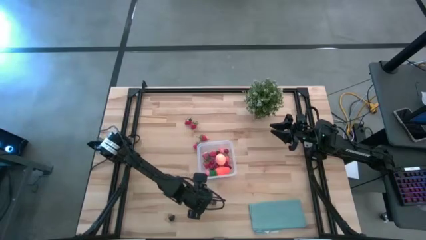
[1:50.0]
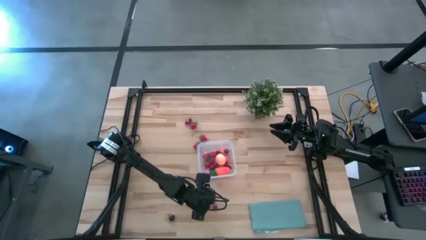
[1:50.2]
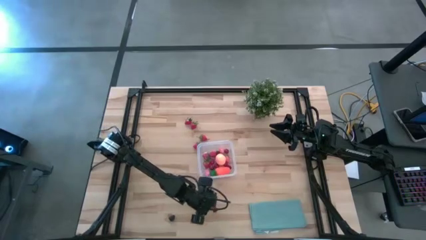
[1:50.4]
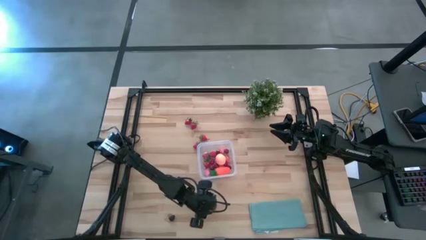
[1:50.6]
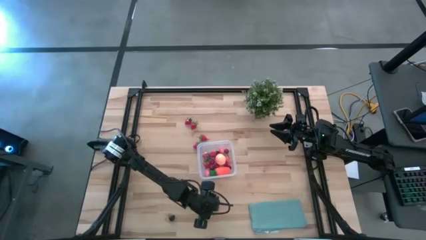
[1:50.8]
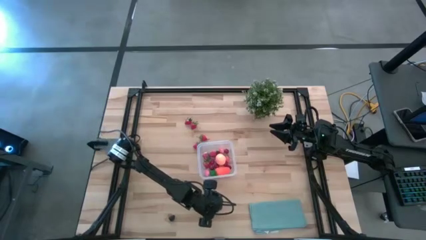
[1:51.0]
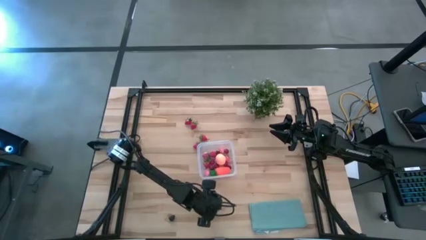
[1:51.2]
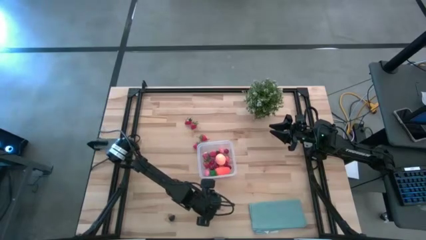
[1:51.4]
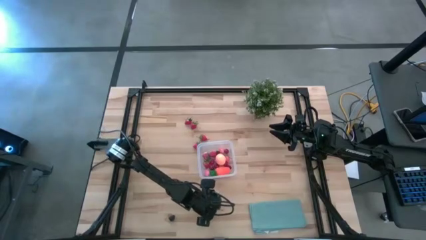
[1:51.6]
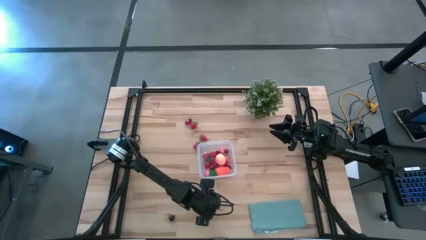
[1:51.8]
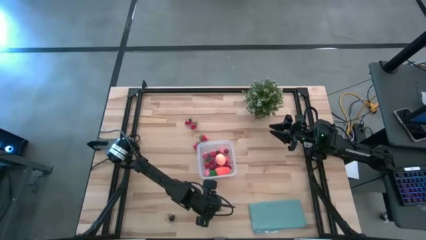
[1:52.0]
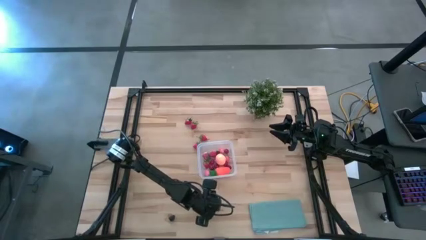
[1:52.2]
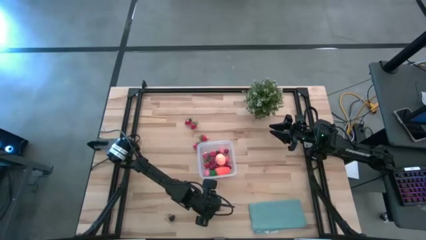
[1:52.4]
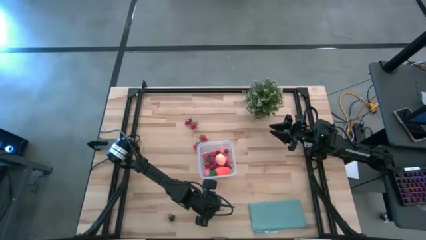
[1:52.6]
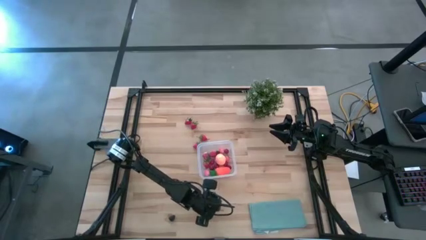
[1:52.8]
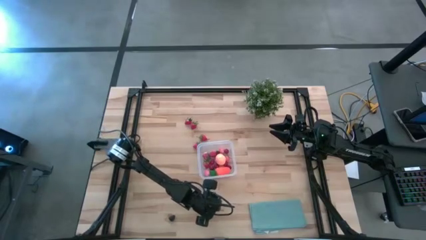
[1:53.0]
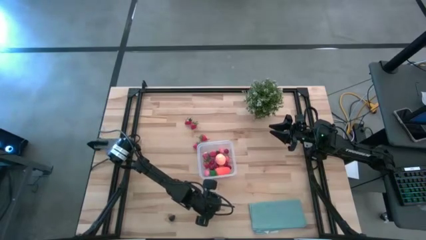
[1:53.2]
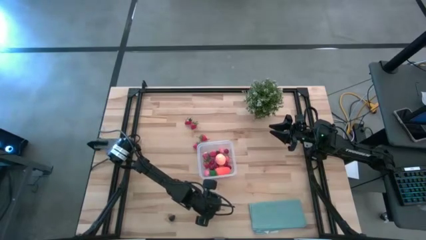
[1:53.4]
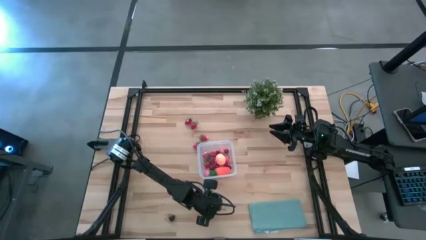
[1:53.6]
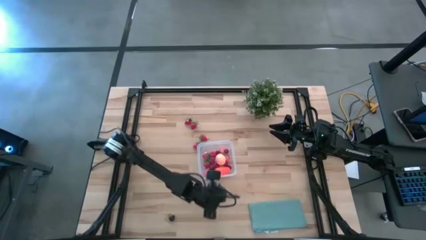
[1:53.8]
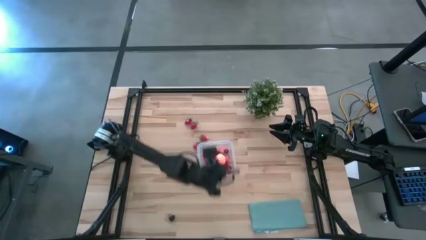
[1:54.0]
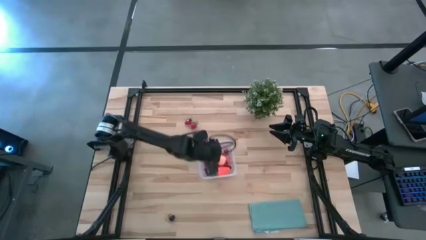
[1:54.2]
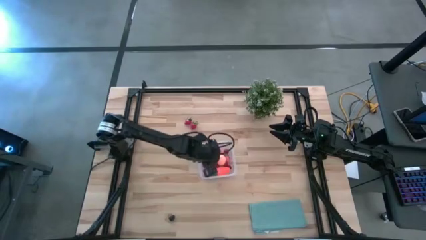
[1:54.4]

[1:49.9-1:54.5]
Task: Pick and placing Produce into tupperware
Put the cherry into the transparent bin

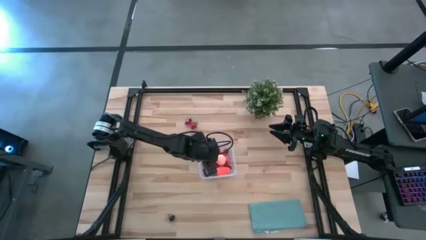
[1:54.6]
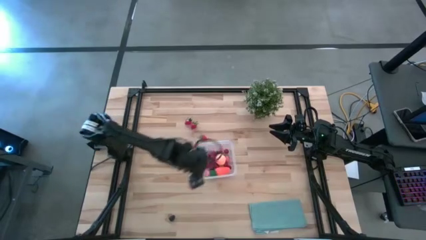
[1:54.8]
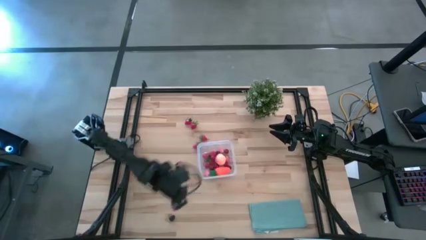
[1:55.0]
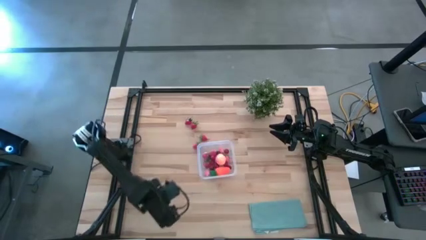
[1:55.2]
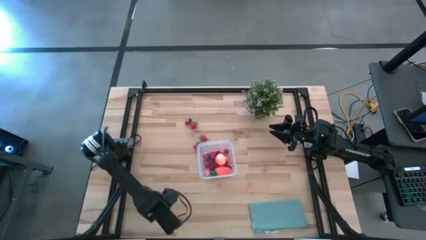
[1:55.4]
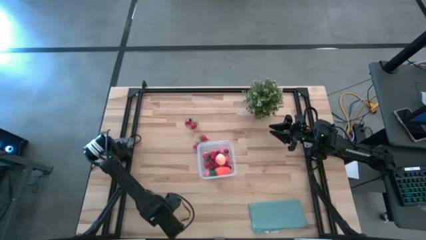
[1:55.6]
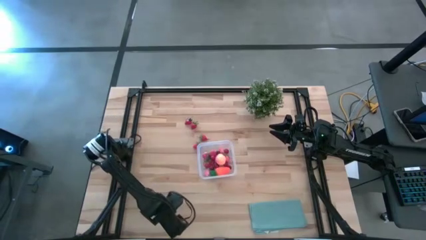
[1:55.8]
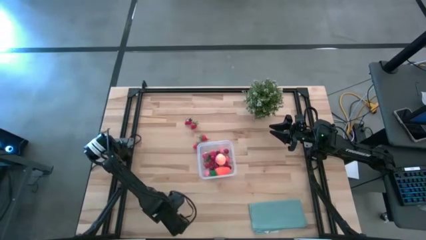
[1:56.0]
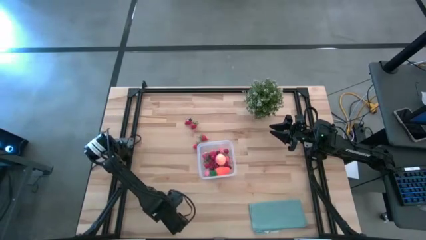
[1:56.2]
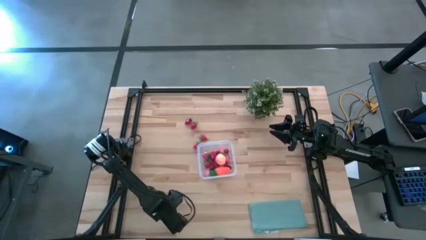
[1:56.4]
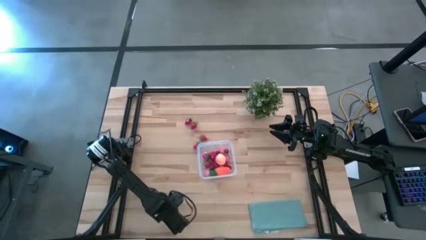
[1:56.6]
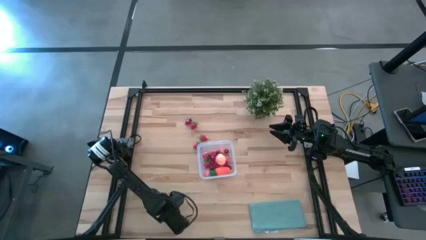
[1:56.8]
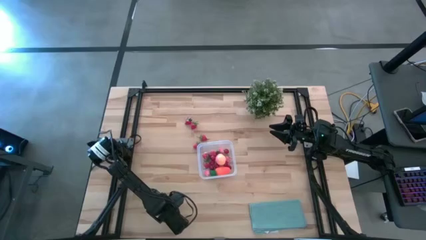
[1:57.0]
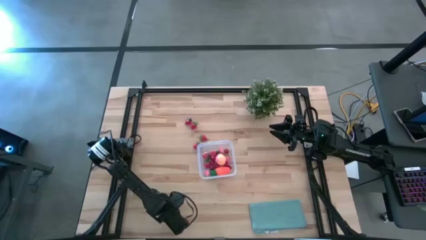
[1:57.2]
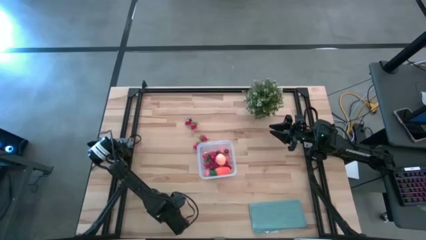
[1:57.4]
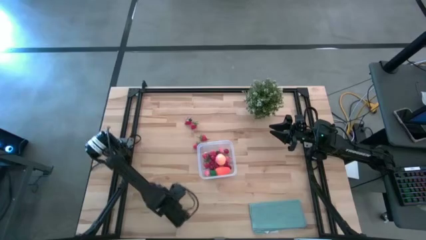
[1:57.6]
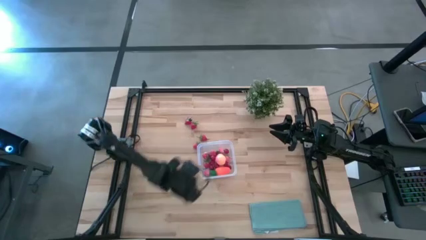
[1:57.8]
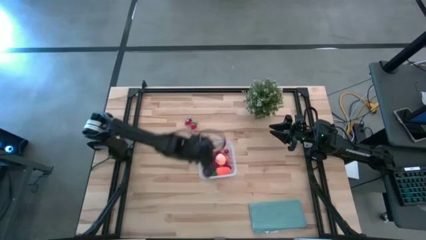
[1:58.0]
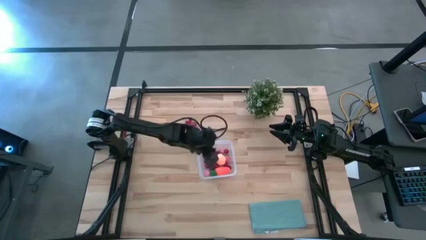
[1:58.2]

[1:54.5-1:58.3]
Put the blackberry into the transparent bin

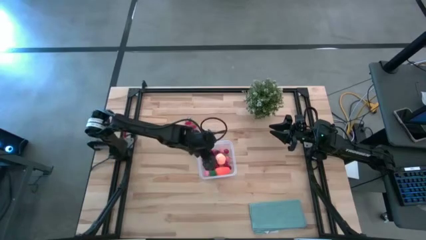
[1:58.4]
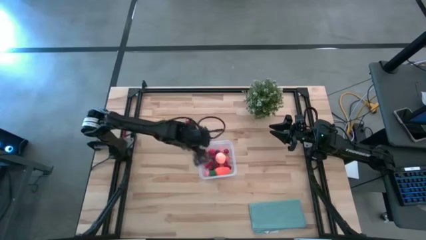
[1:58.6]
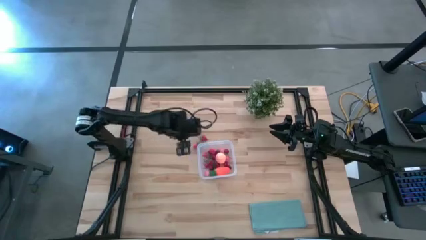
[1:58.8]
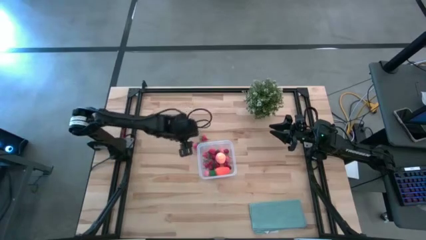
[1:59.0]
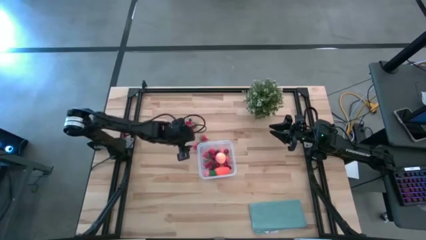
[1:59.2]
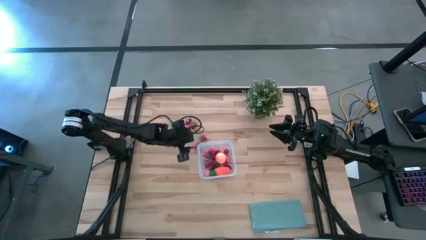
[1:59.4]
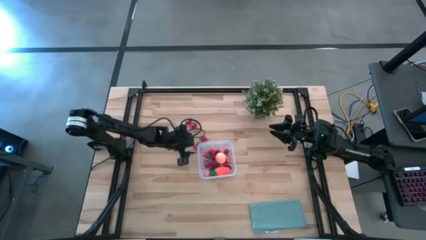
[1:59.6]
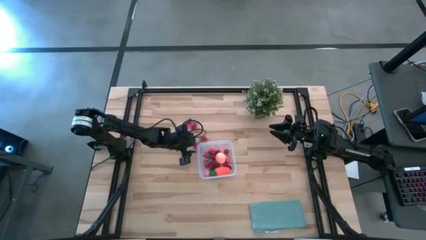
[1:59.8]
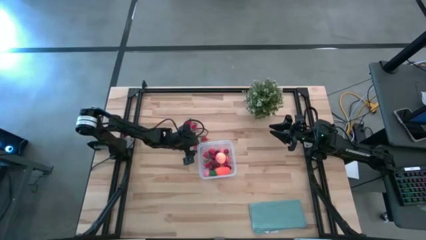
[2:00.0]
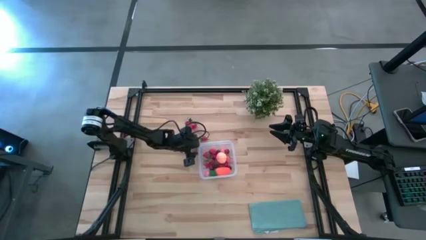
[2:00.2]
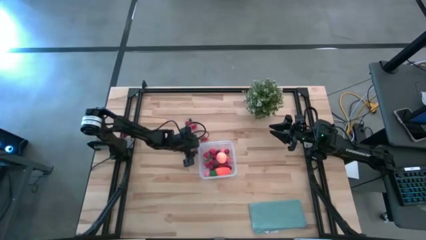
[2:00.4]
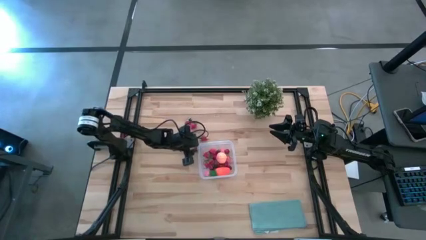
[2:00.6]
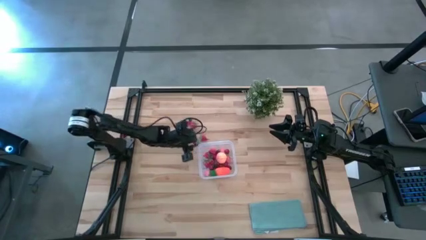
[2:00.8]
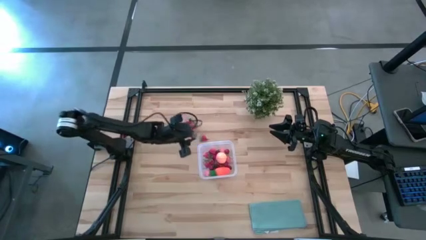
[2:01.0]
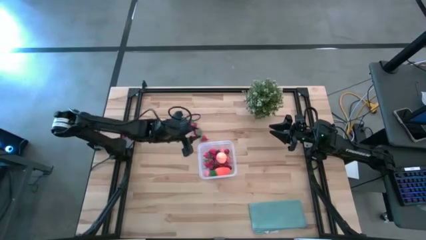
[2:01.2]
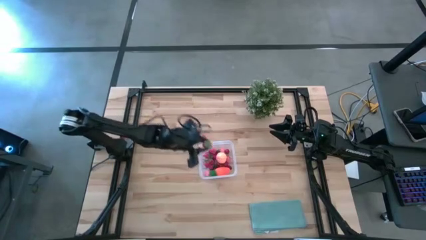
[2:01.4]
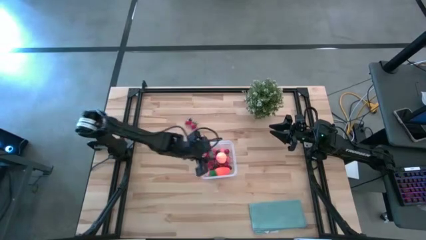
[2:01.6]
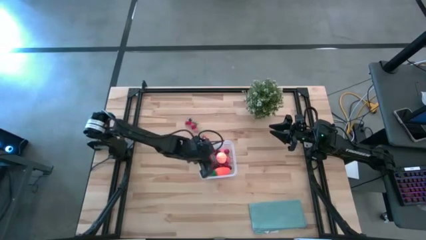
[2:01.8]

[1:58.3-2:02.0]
Put the strawberry into the transparent bin

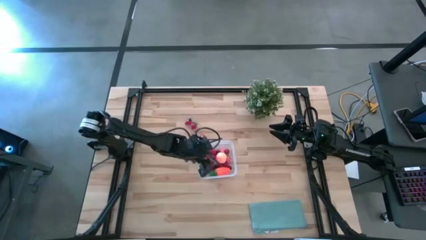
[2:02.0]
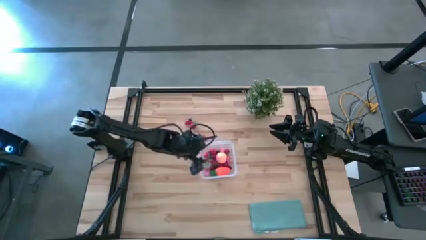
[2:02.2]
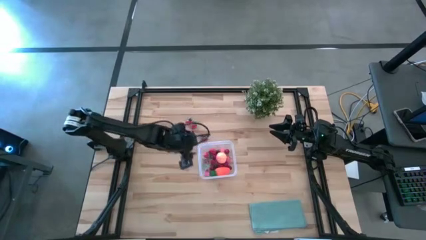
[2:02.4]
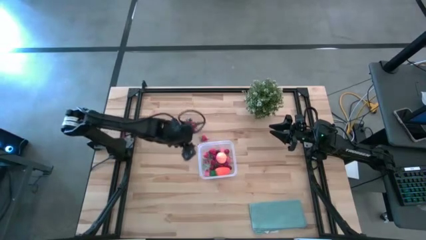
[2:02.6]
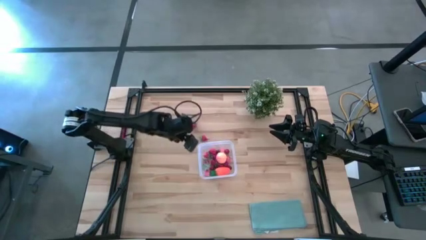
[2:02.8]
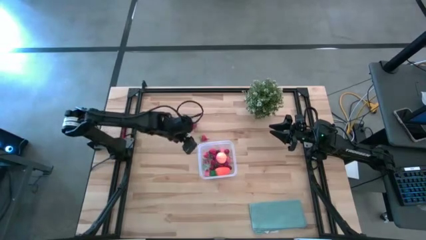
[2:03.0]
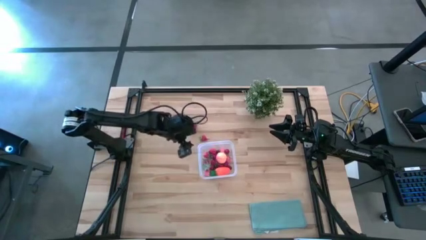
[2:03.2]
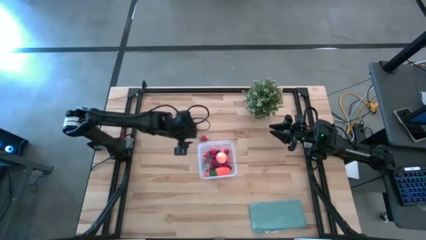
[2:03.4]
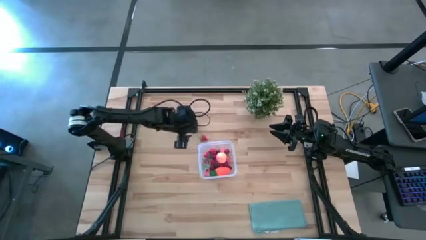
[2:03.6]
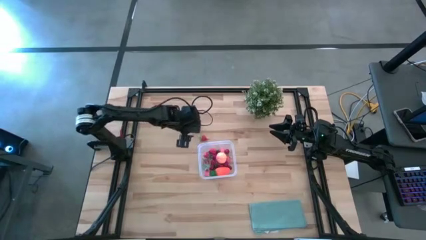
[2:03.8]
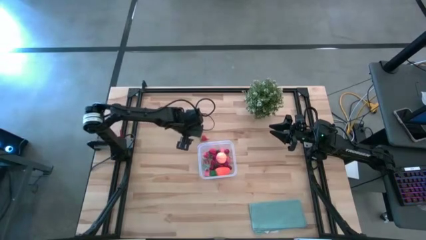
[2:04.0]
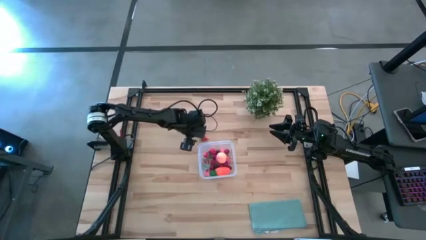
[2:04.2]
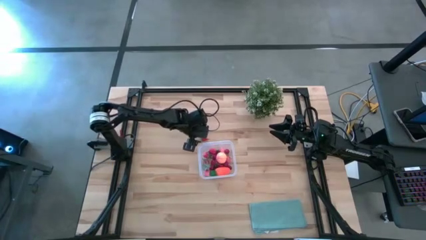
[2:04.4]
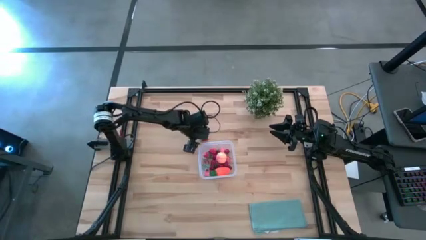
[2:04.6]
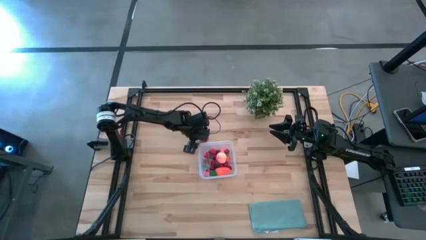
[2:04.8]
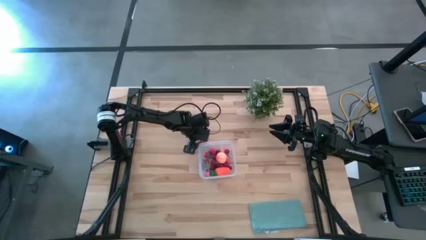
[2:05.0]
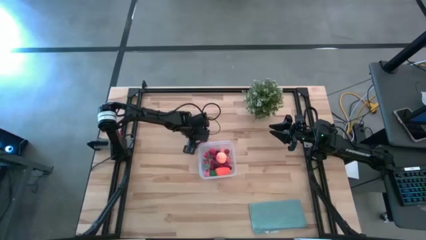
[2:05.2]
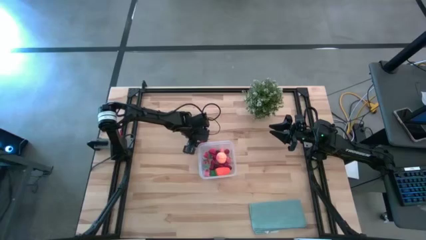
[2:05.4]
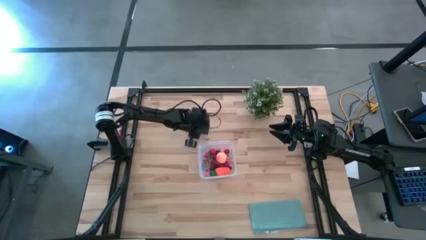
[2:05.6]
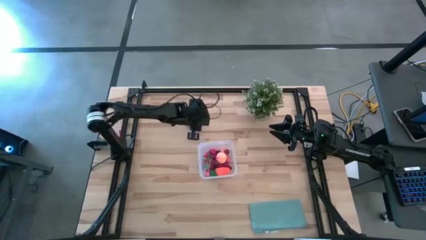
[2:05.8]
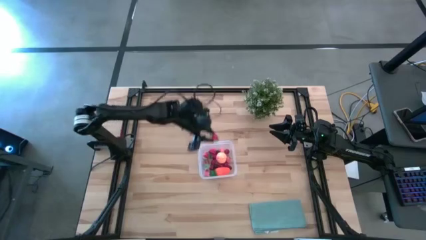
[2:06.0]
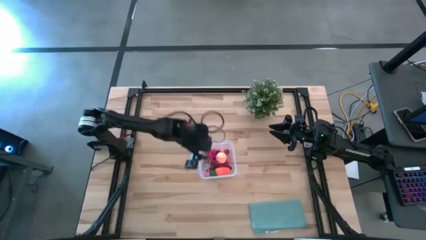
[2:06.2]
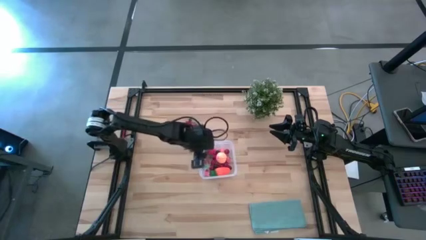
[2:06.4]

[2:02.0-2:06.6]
Put the strawberry into the transparent bin
